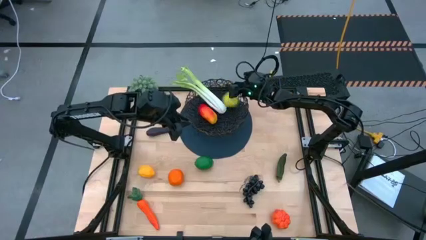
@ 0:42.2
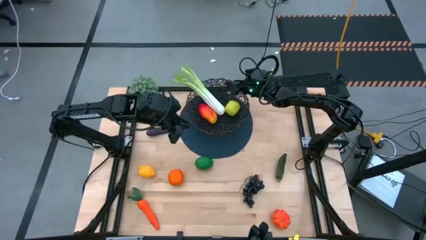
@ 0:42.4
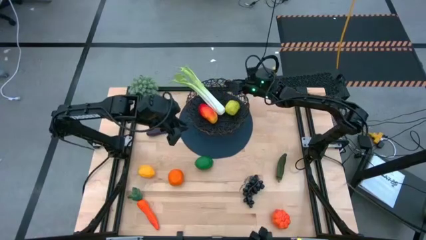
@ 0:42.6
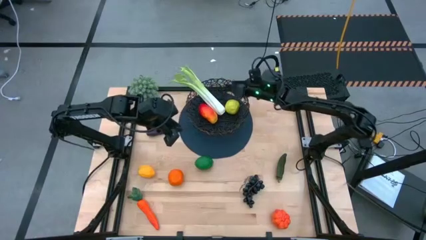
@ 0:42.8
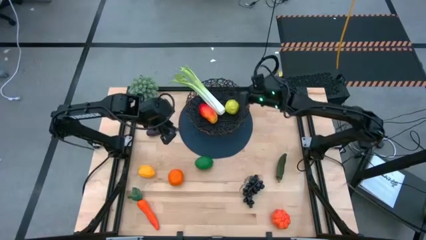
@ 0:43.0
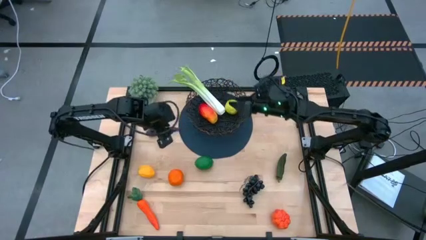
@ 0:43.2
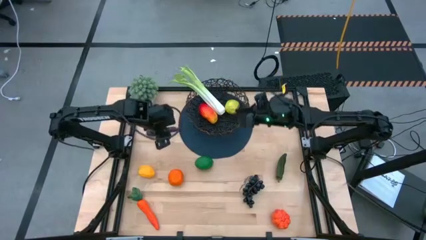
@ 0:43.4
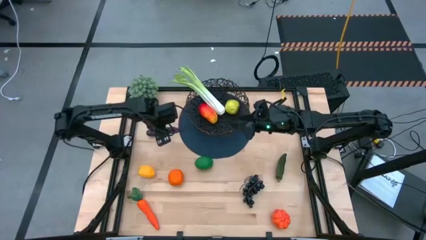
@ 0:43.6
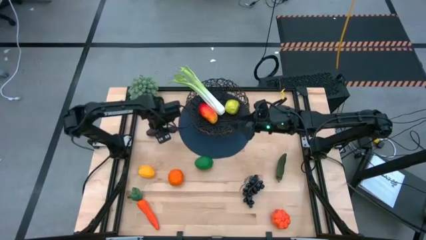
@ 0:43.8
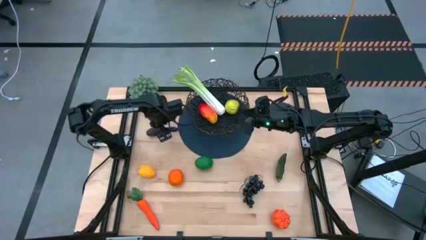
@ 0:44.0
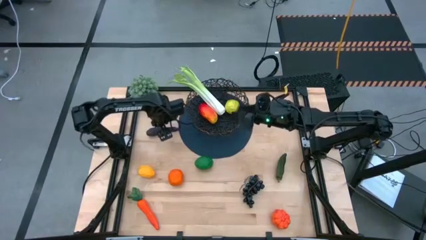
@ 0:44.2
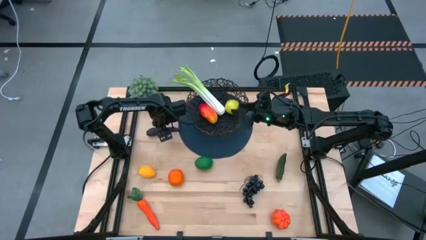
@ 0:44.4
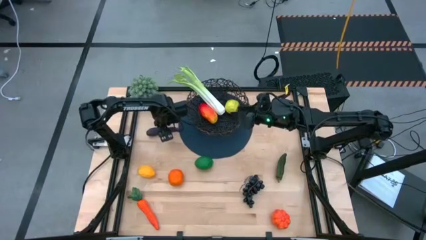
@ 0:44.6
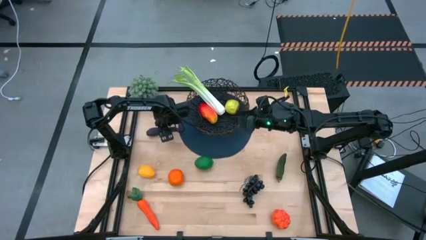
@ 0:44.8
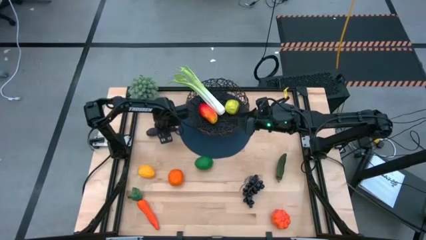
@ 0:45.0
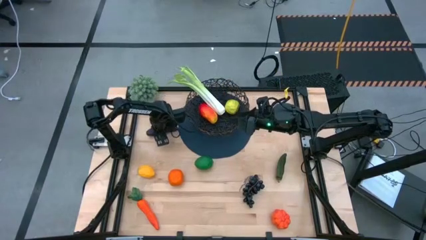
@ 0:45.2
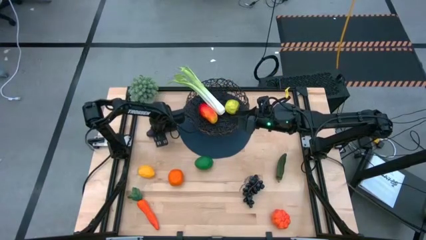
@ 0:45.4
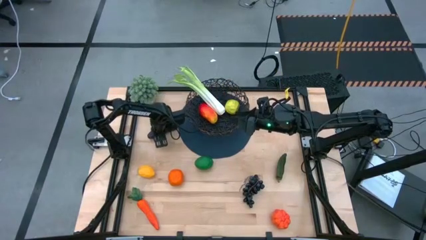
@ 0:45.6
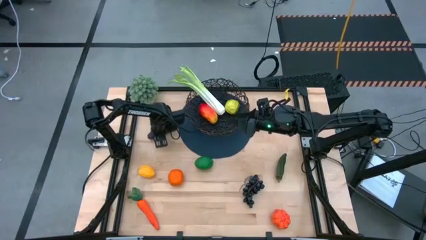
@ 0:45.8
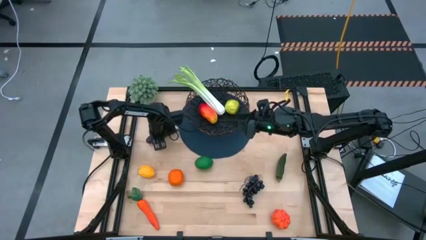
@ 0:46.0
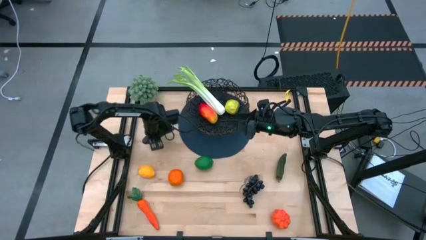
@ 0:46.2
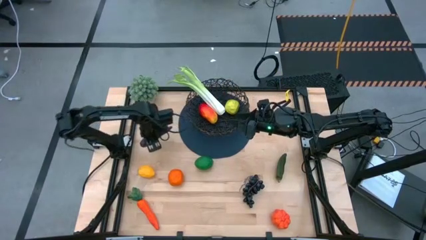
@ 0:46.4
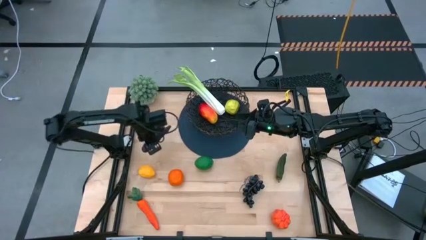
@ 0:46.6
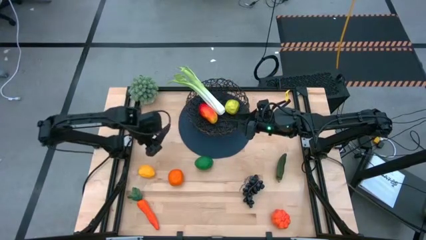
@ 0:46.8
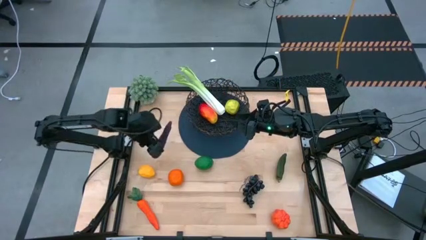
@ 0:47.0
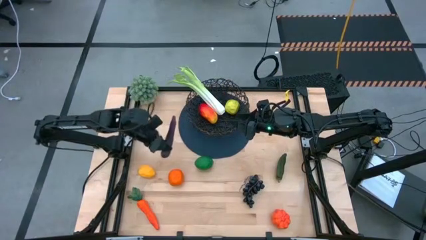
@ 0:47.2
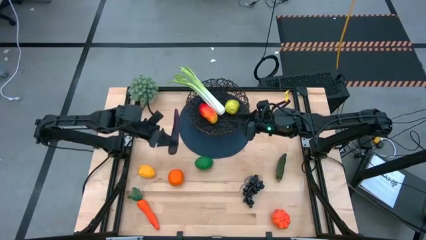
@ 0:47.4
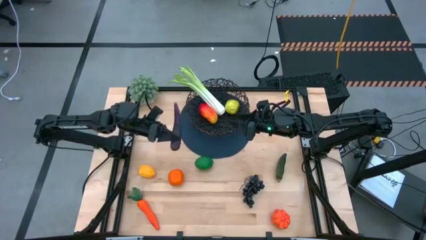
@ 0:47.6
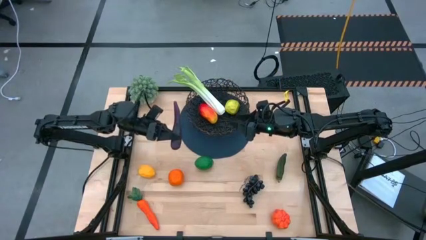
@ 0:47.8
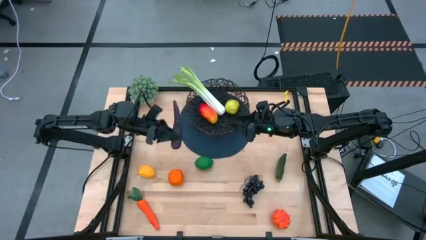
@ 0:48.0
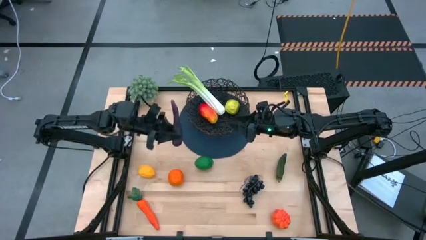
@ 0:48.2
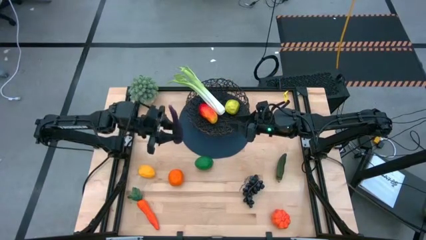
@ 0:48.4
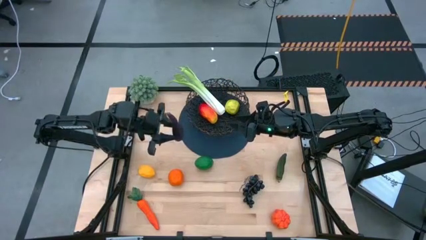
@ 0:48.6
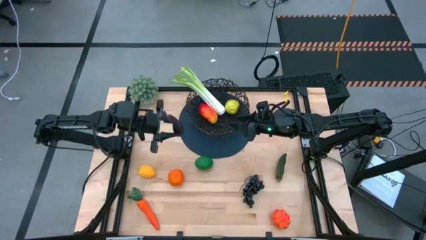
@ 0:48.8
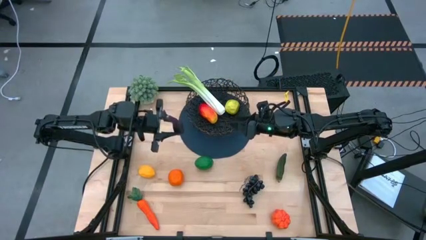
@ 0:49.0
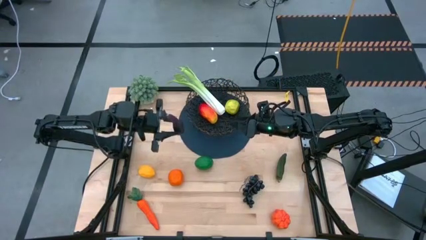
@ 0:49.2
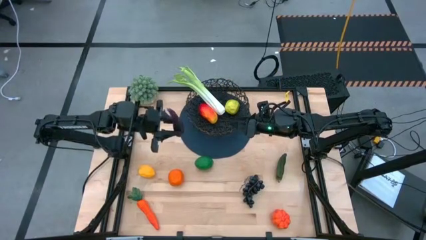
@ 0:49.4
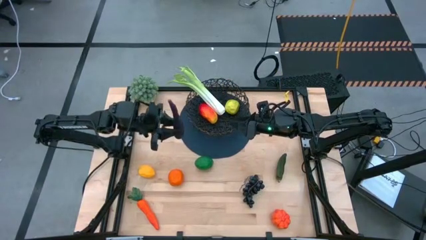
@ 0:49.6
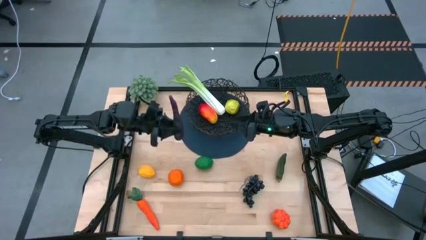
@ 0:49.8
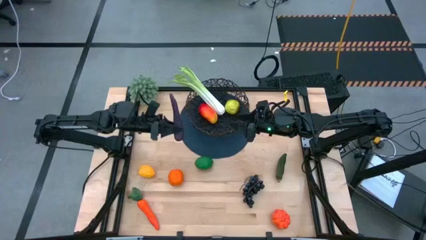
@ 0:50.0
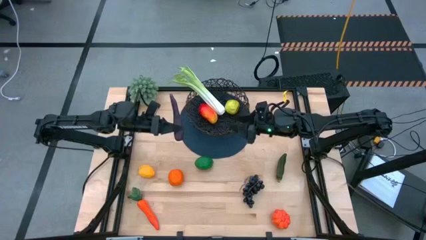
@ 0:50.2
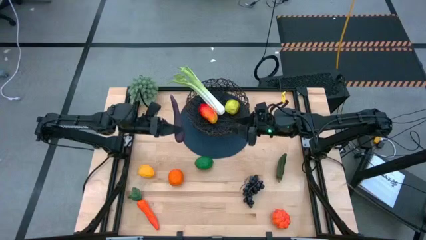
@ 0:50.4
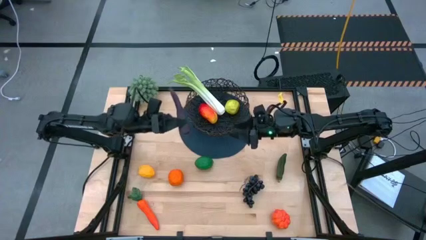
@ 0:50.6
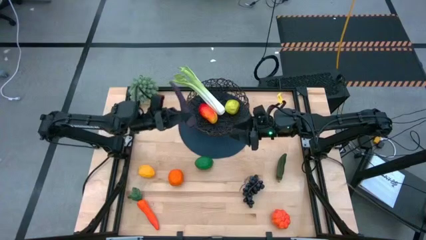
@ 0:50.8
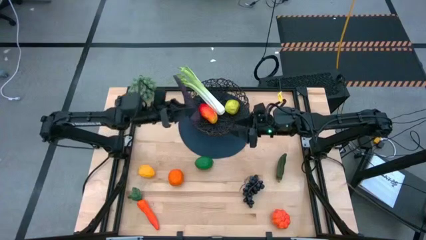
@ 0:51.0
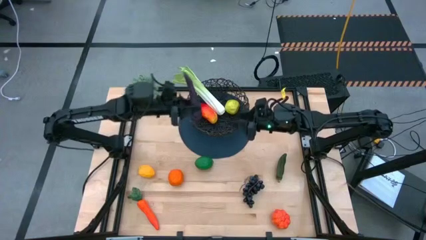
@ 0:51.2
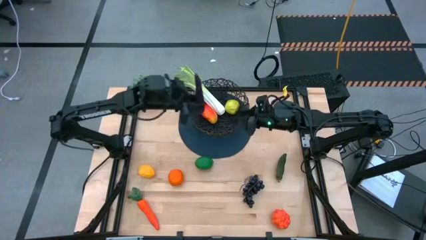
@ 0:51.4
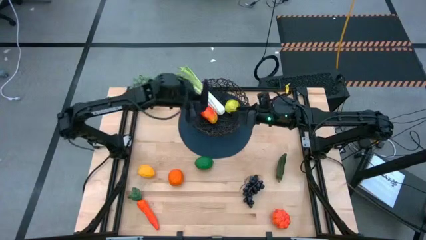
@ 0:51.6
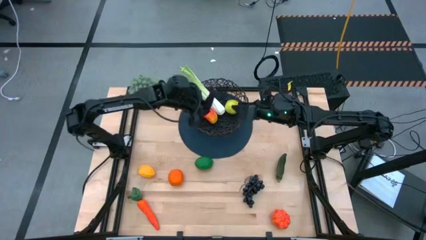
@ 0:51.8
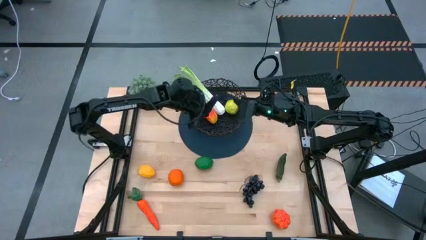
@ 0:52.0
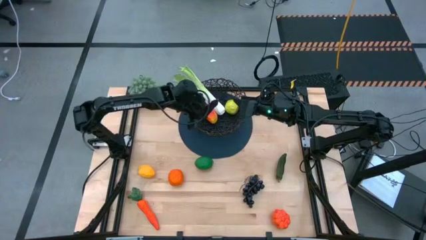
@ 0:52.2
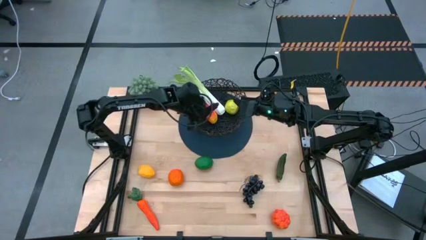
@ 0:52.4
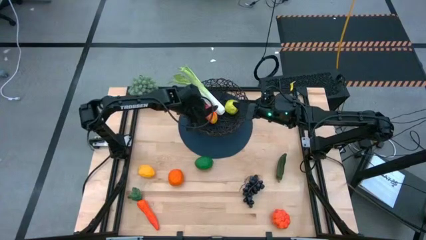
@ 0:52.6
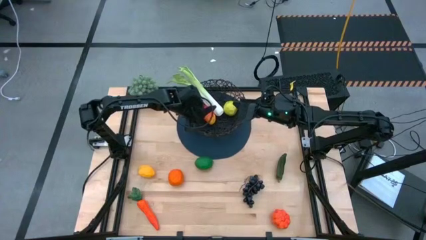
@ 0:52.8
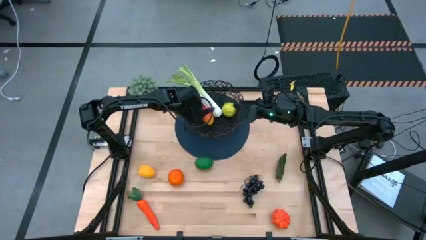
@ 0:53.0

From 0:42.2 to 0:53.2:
Task: Build produce basket
Put the violet eggplant into the wire basket
